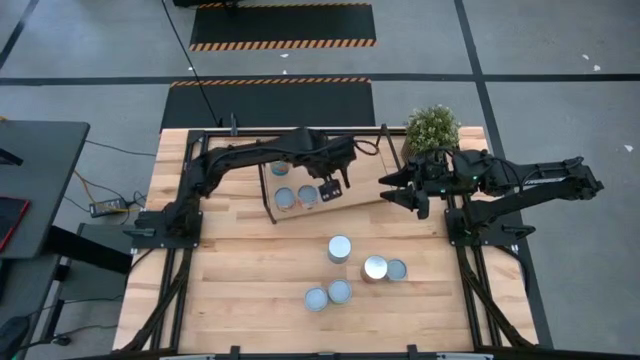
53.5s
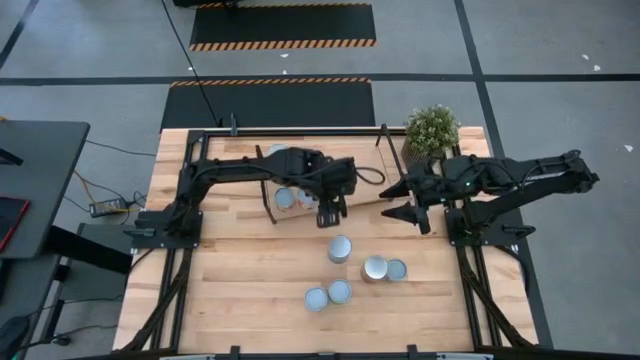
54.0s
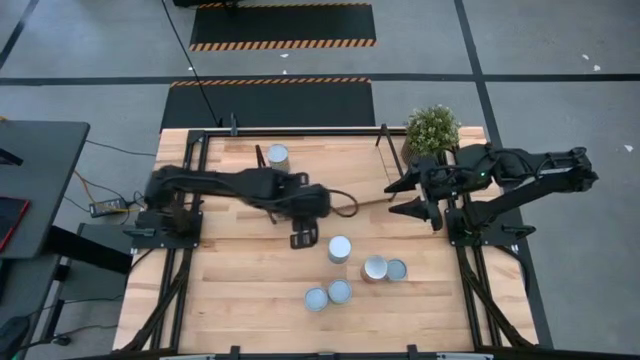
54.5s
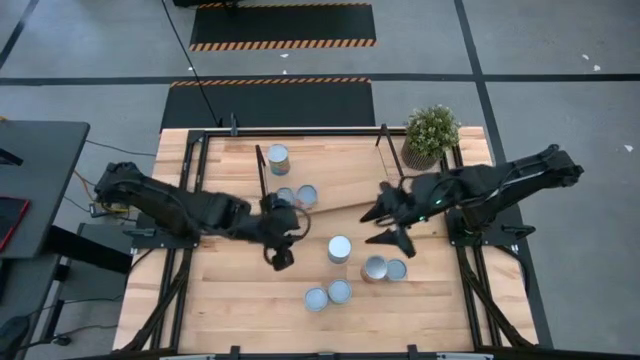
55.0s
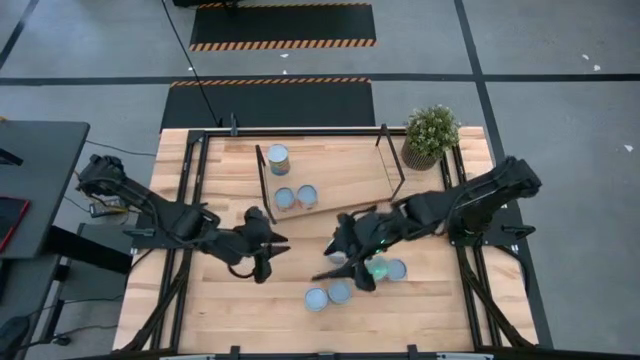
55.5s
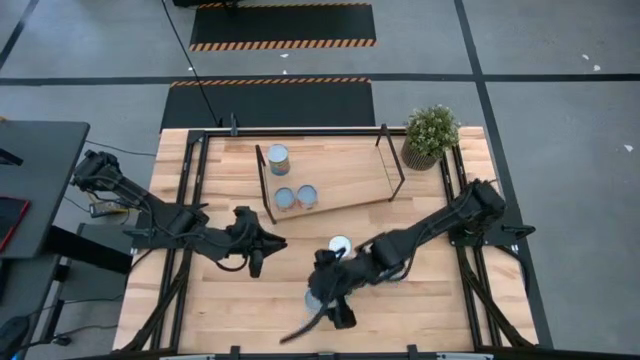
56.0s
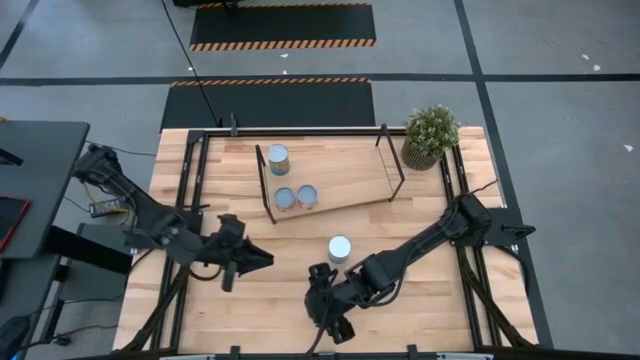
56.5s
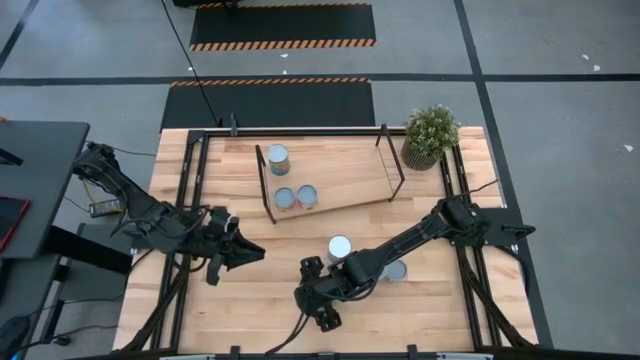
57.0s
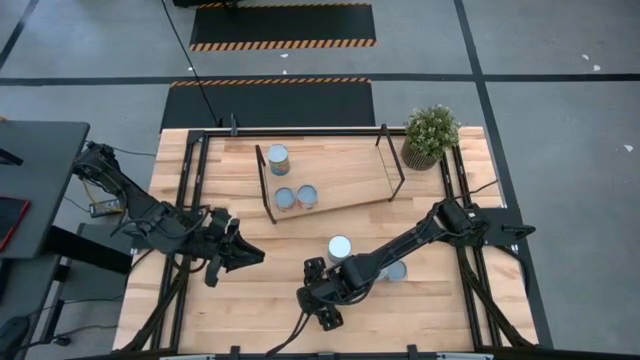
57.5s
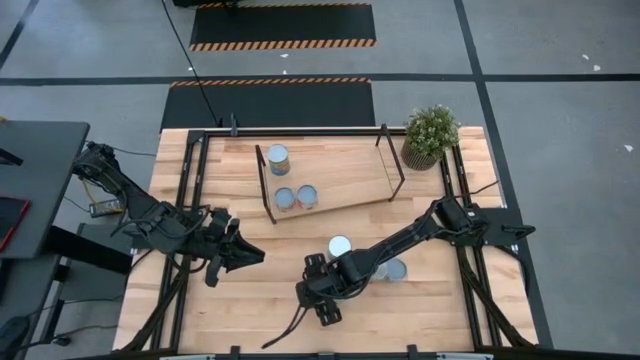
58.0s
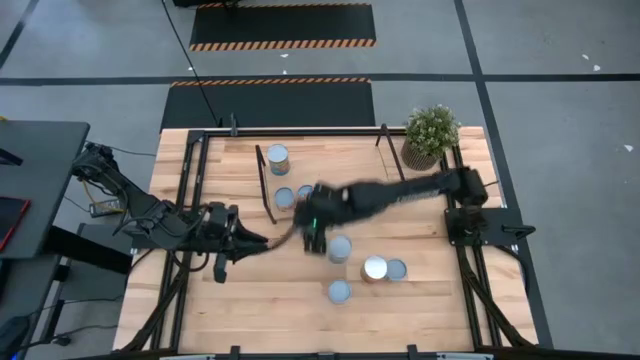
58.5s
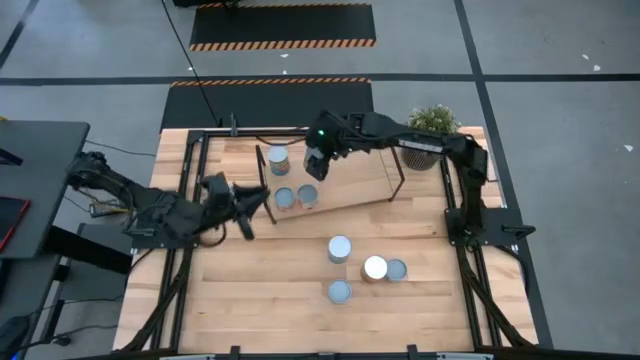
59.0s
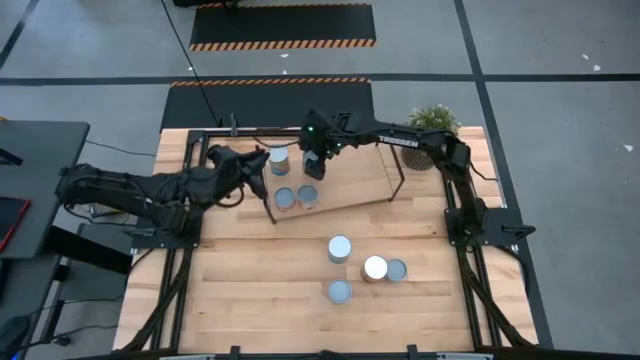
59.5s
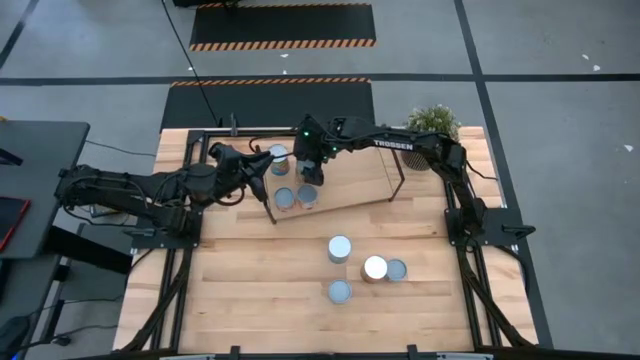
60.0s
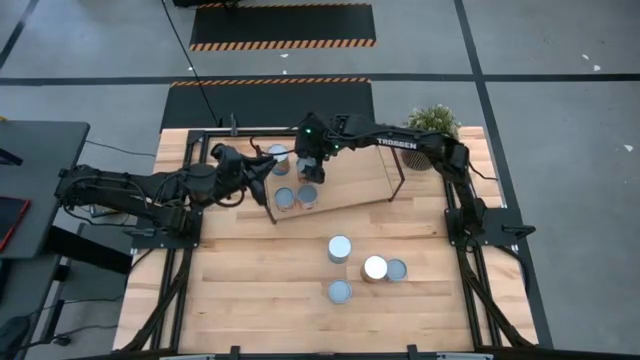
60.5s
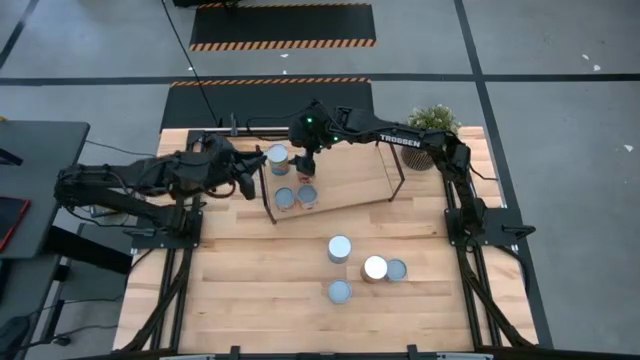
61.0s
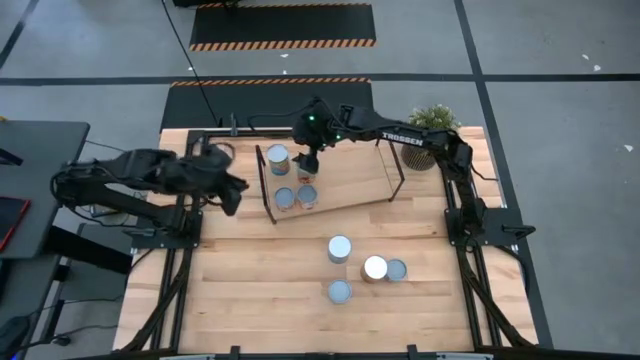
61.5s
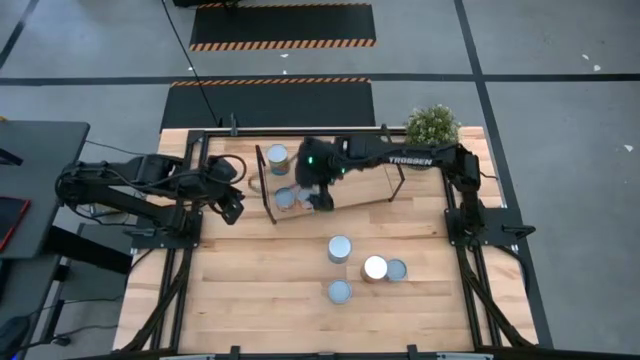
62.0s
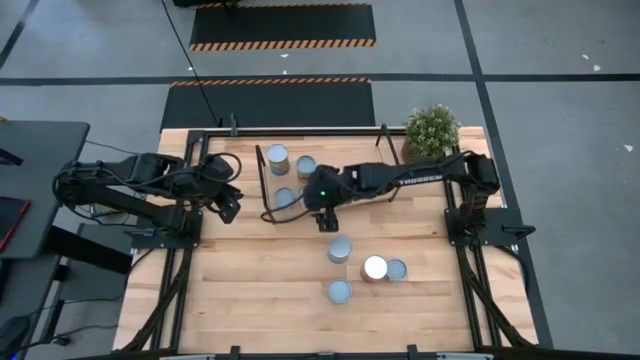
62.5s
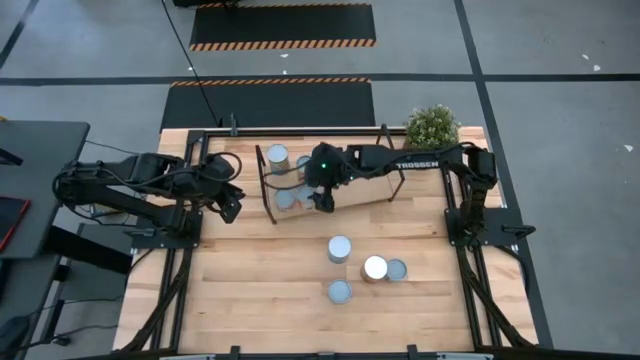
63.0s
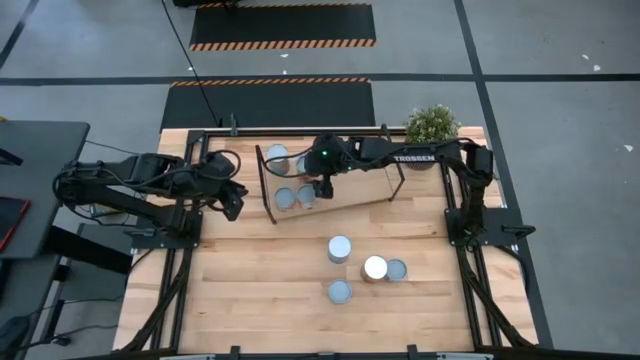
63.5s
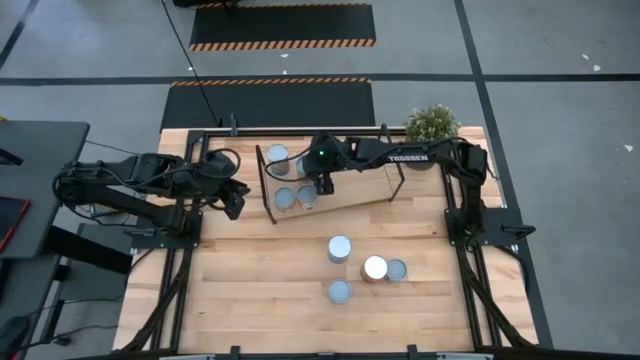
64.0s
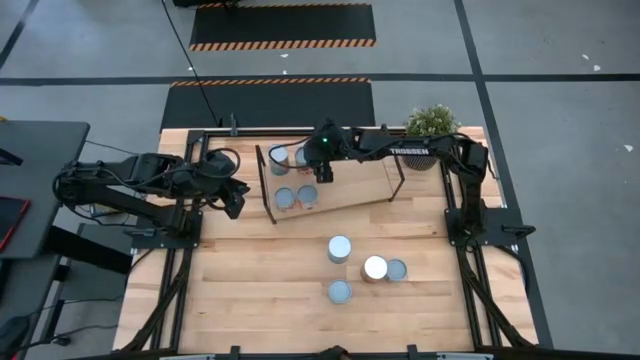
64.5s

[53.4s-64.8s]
Task: Pick and place cans onto a shelf
Put the canned spaghetti sauce on the shelf

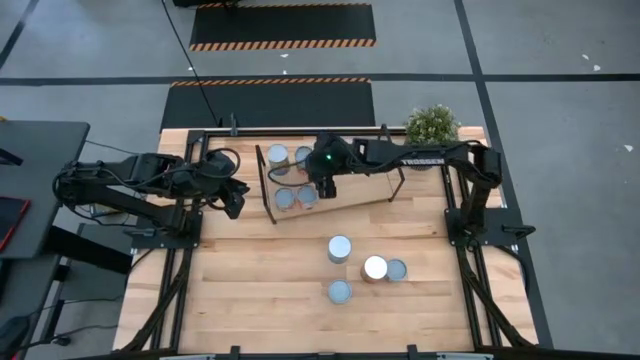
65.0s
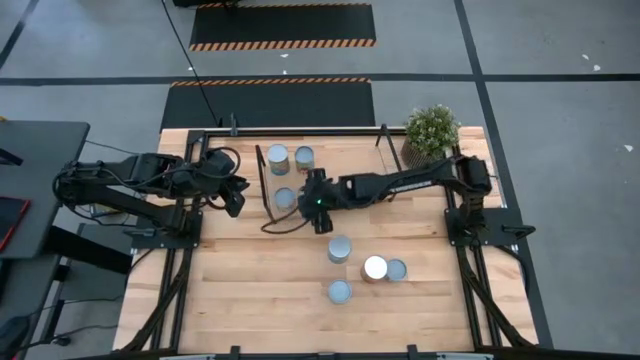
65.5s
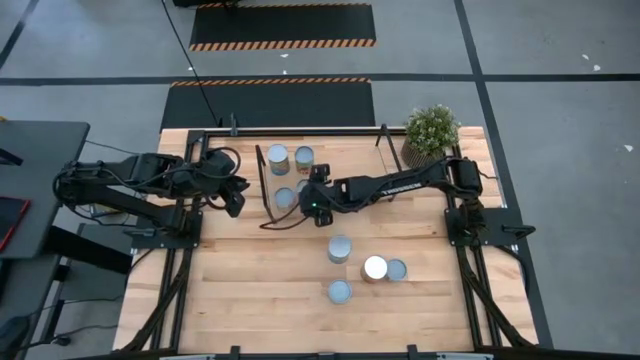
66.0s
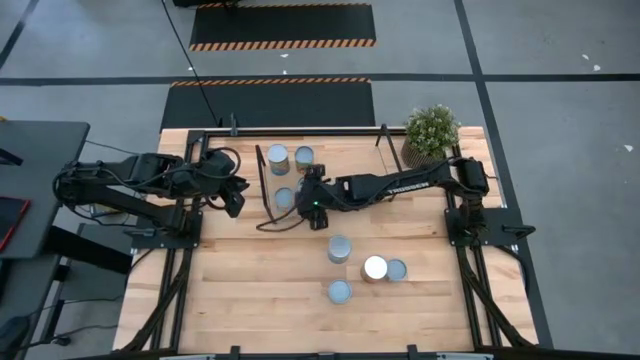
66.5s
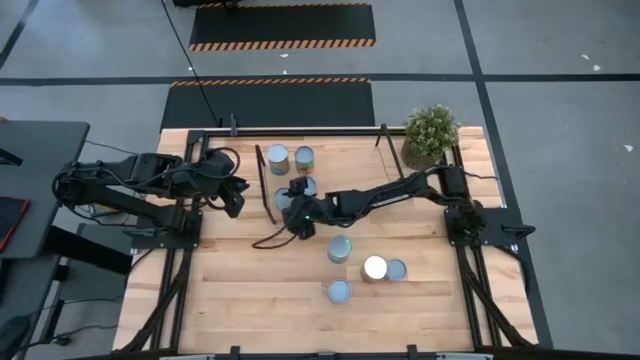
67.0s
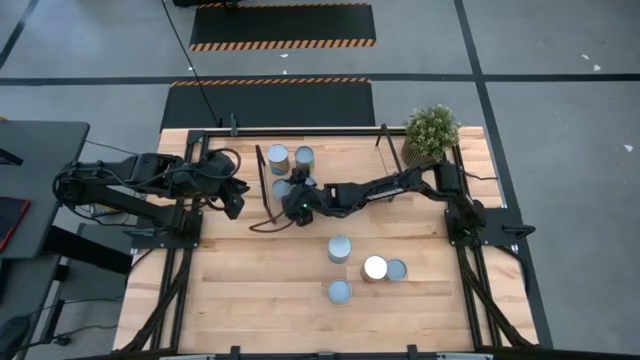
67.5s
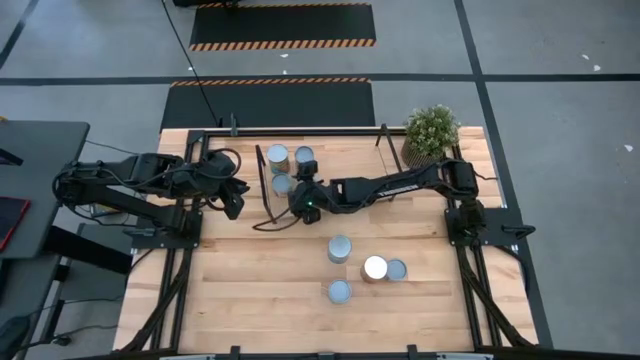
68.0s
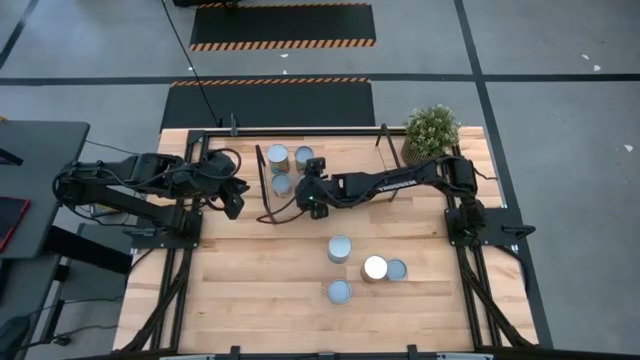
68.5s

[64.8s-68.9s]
Adjust the canned goods on the shelf

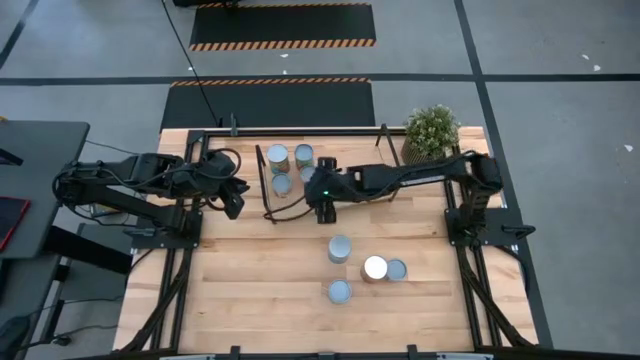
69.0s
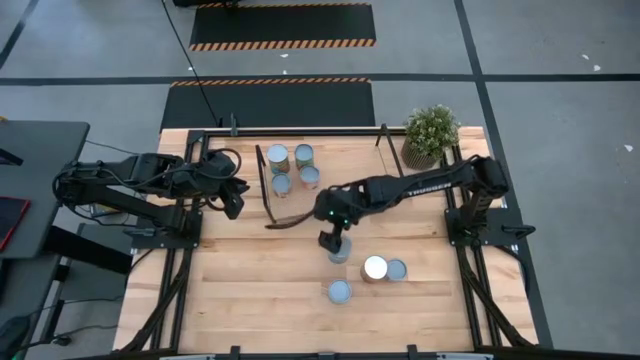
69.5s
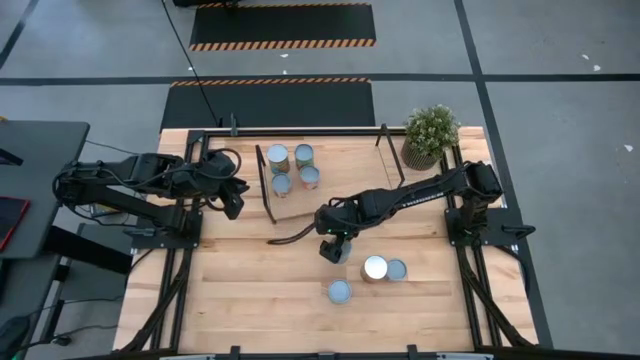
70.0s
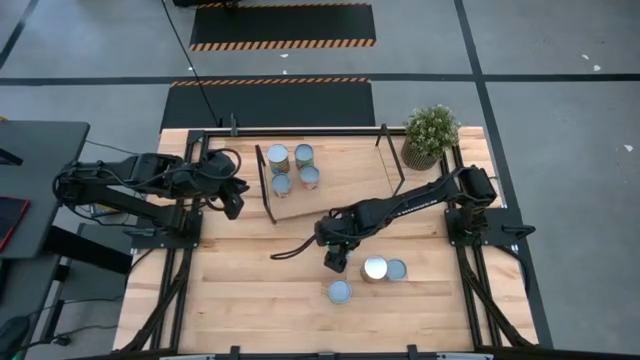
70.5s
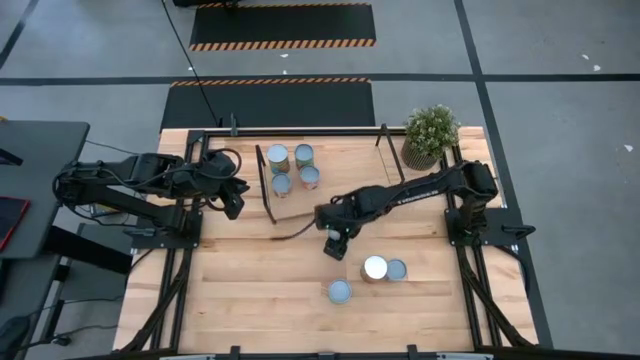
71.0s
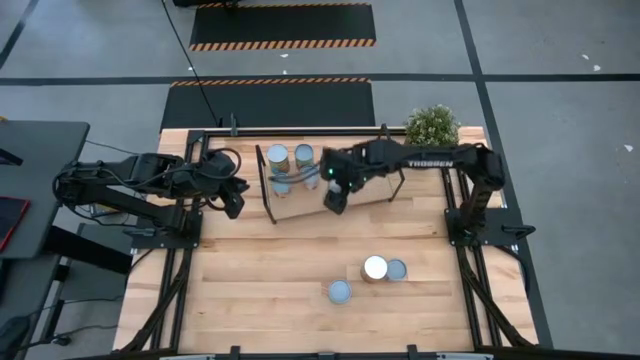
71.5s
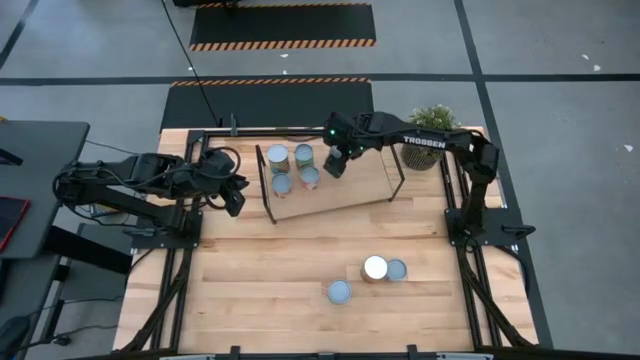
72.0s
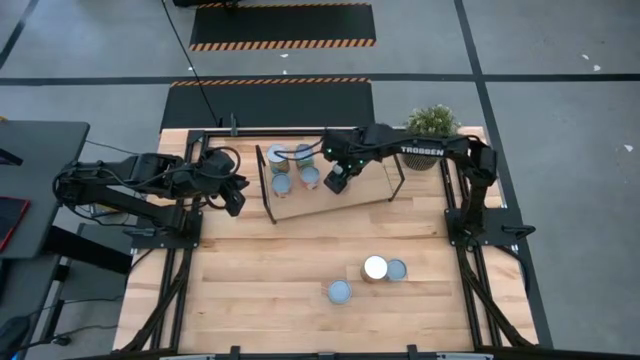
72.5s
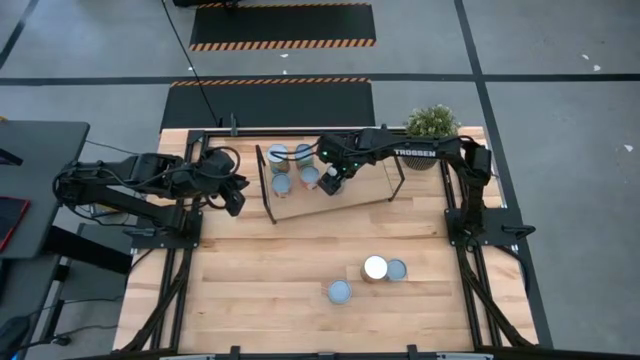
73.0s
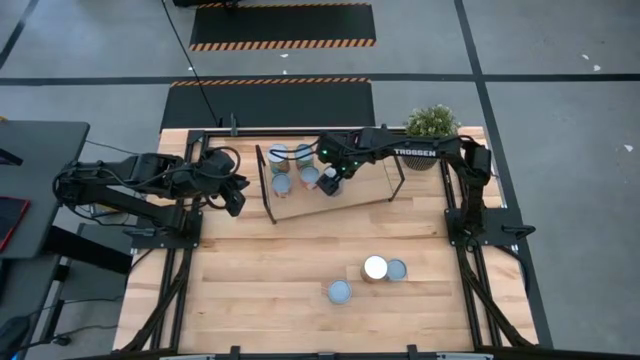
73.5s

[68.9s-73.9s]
Put the canned cherries on the shelf

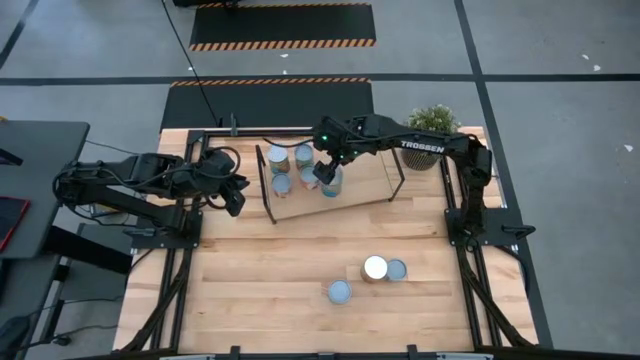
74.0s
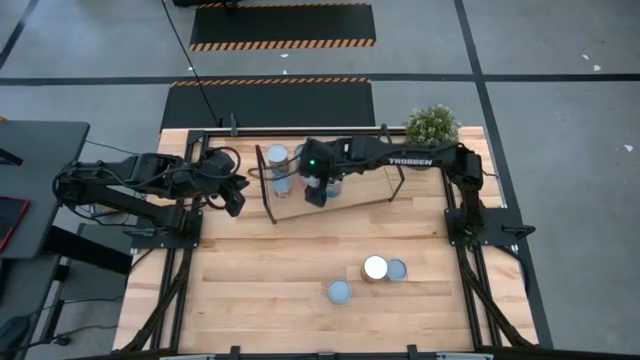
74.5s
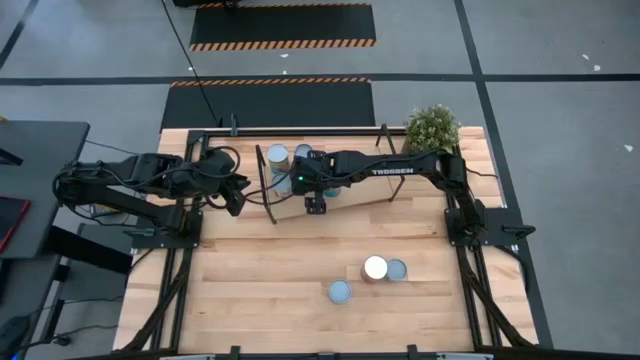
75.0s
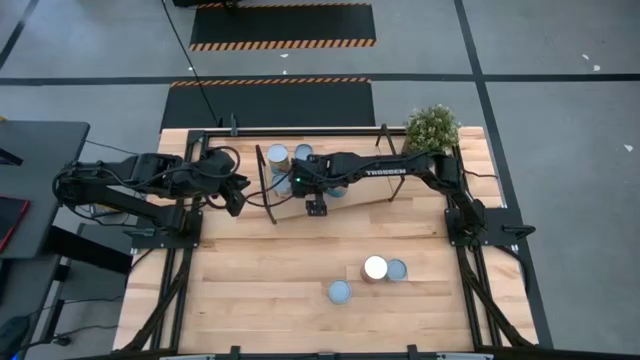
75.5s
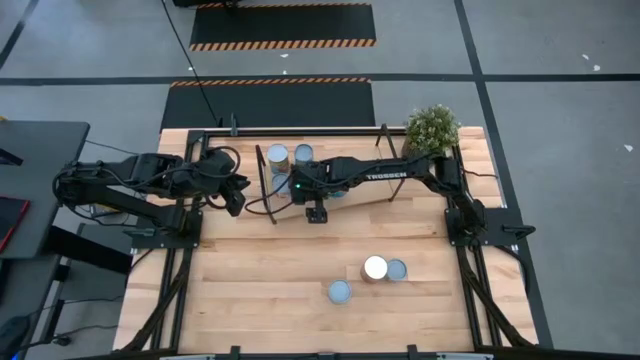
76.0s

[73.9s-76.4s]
Adjust the canned meatballs on the shelf
